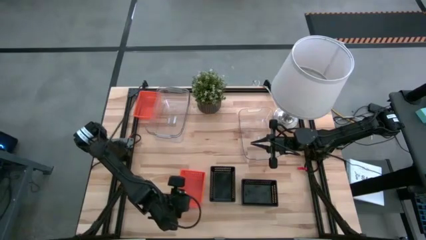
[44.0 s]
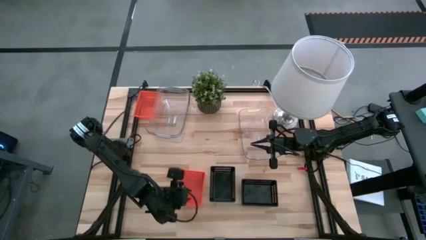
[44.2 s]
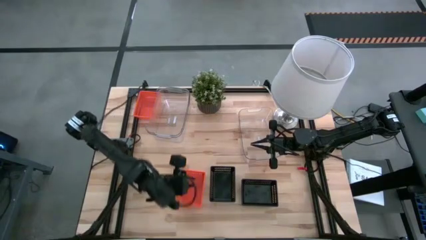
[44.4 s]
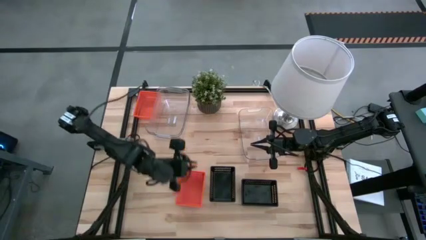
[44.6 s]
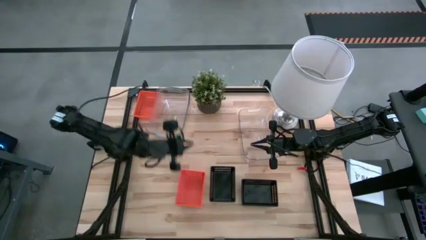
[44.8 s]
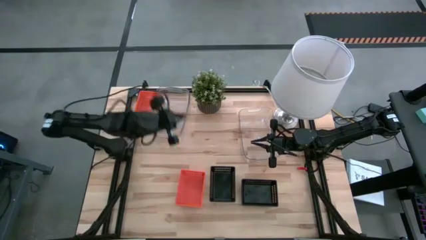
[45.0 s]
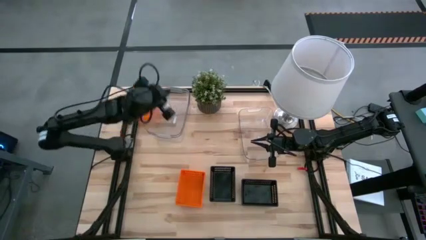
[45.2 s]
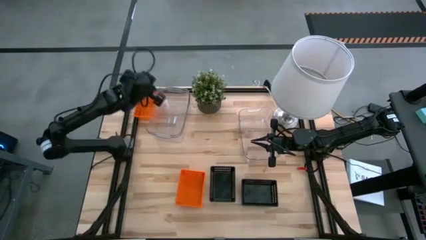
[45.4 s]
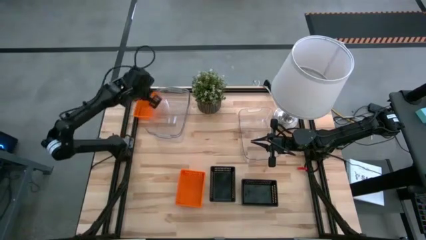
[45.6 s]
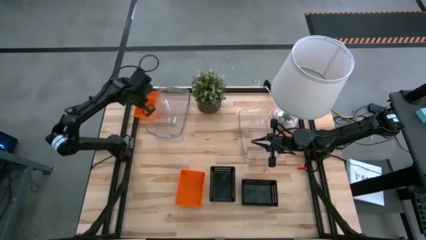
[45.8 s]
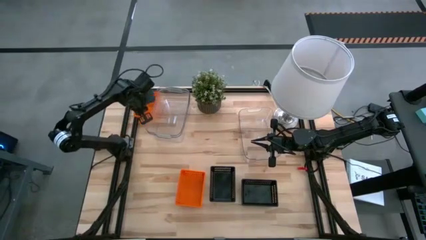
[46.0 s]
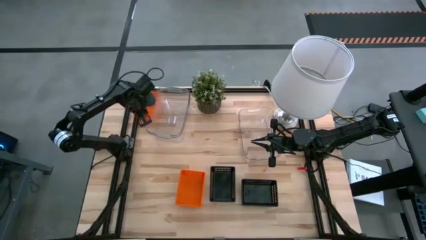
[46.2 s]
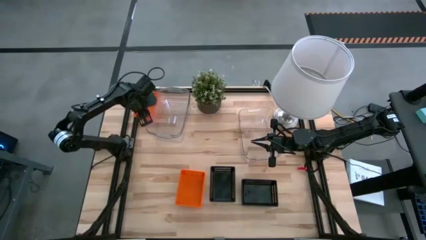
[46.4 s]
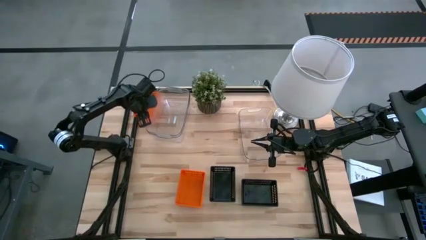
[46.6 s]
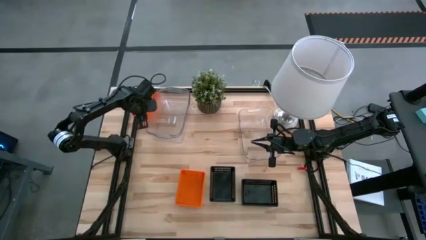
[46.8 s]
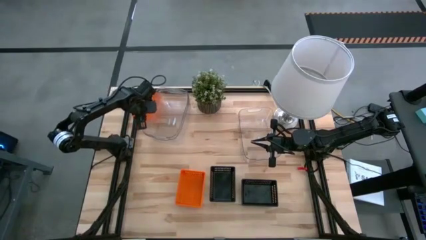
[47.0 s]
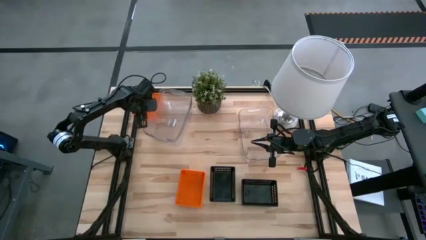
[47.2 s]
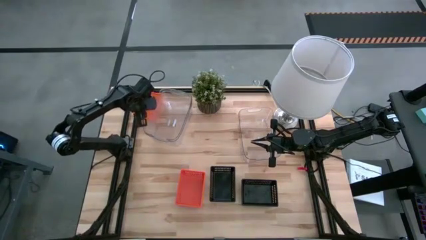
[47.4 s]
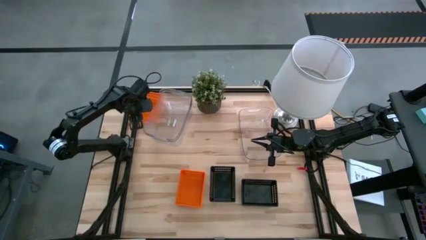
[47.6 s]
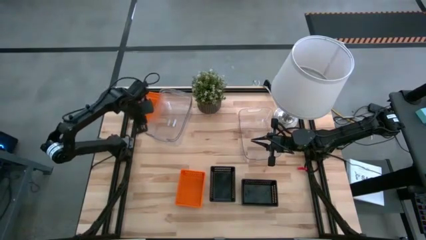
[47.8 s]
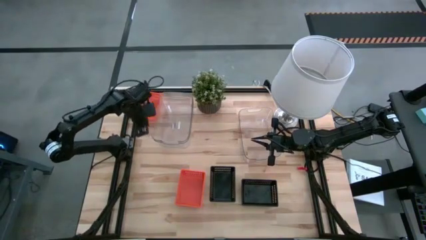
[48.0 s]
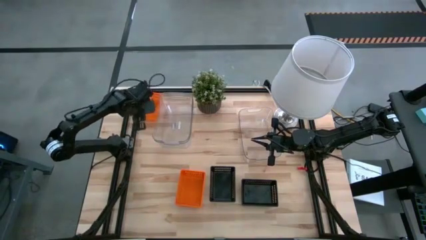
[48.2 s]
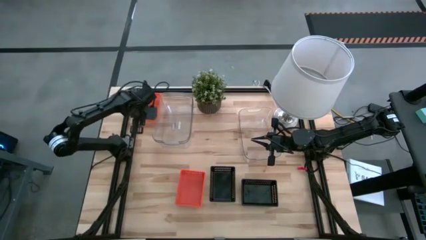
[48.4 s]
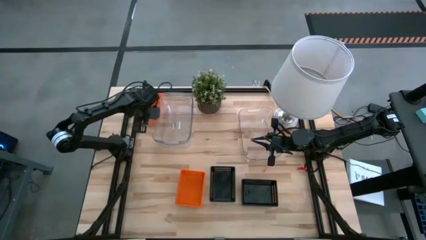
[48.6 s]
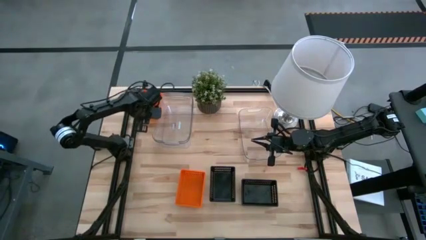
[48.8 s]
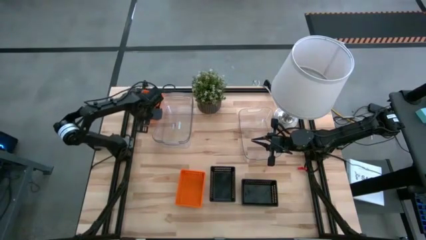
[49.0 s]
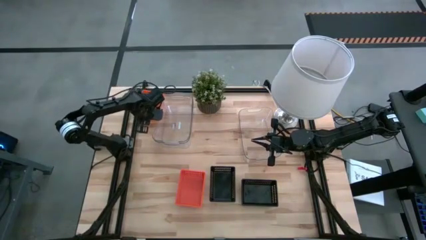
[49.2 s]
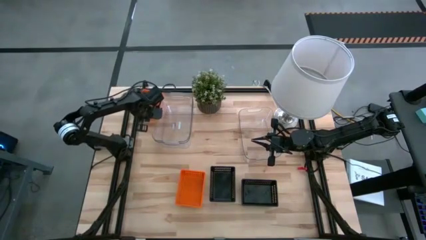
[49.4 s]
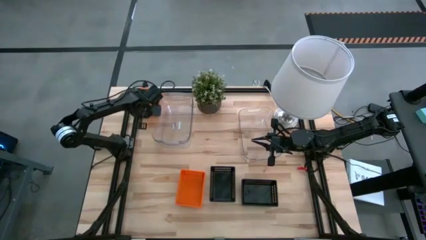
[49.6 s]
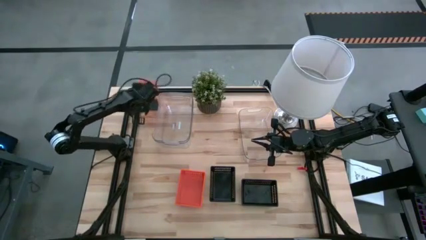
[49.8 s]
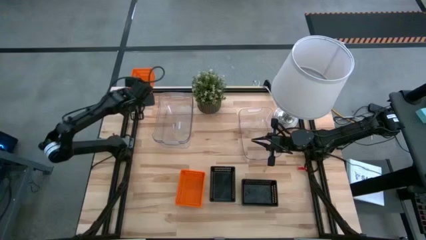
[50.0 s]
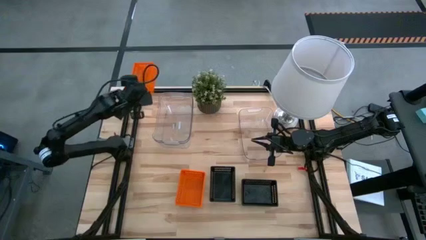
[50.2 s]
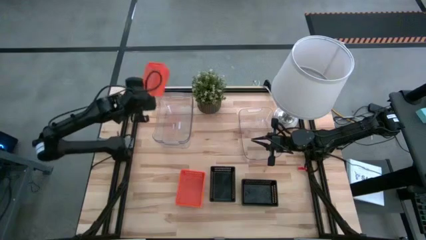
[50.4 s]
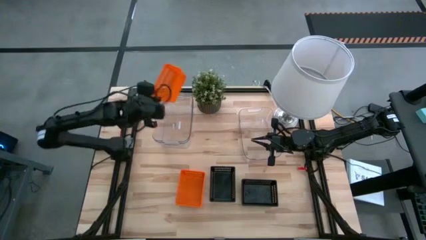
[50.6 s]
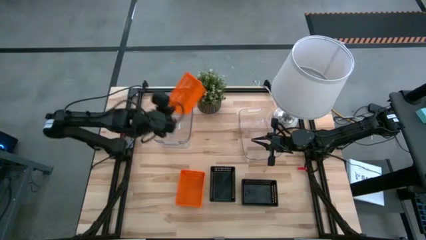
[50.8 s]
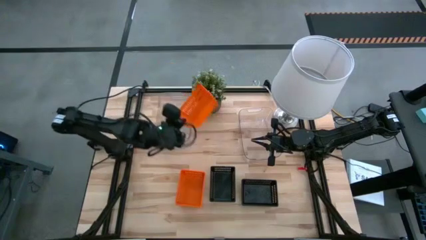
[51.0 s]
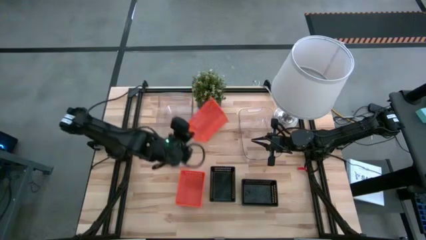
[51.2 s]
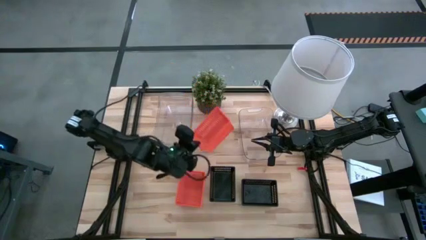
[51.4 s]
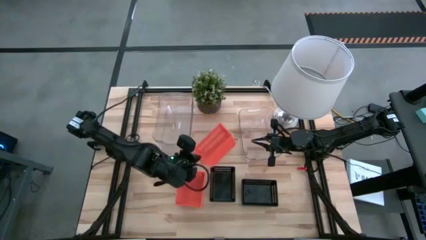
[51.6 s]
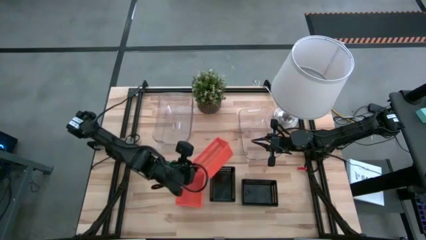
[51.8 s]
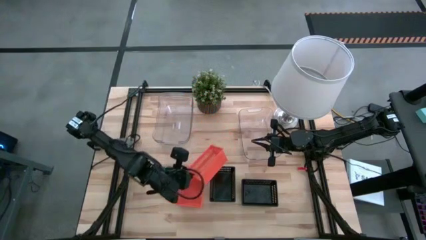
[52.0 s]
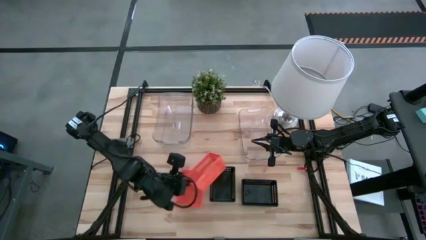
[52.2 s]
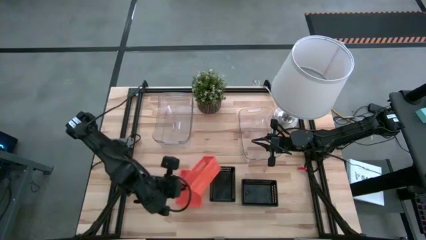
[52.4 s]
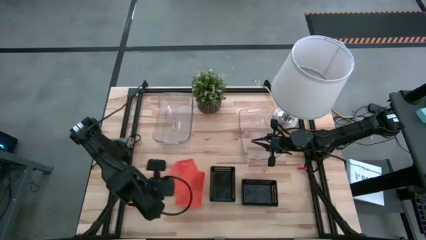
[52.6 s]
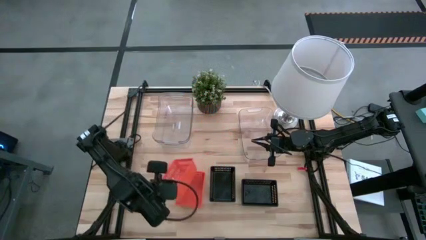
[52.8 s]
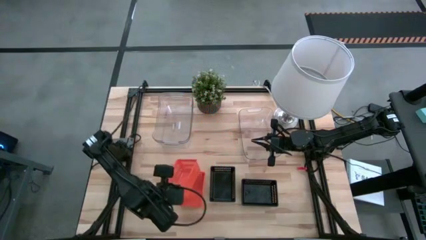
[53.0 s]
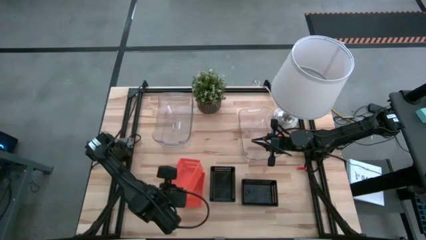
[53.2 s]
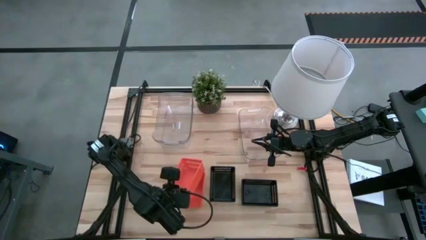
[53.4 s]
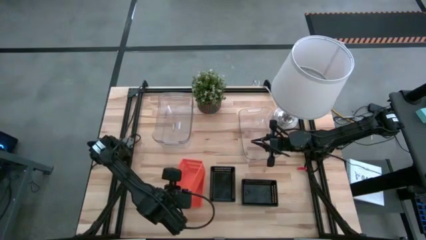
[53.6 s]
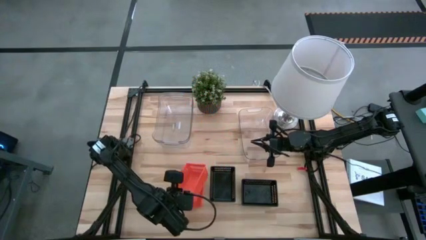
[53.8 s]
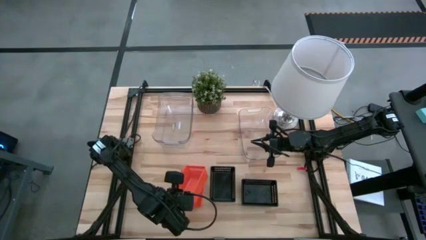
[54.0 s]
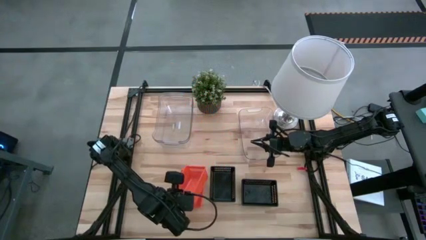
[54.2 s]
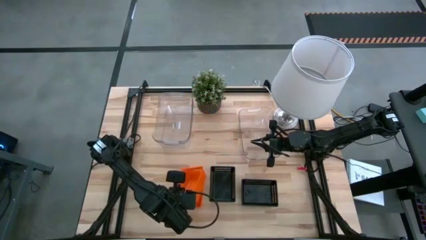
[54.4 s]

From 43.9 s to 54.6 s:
Stack the top orange bin on the bottom orange bins

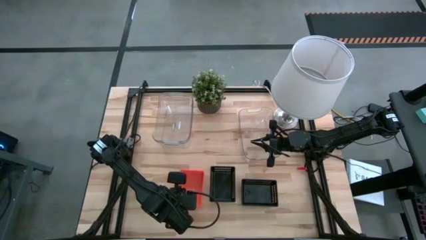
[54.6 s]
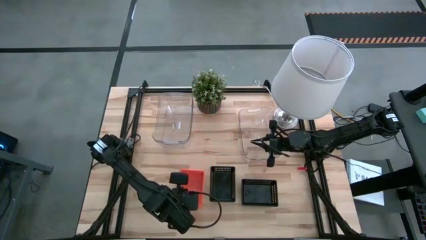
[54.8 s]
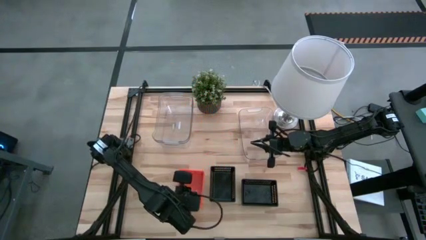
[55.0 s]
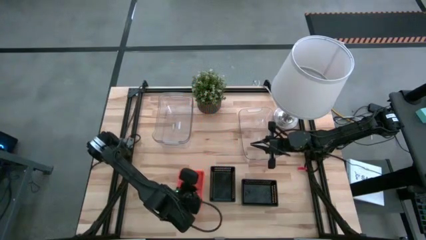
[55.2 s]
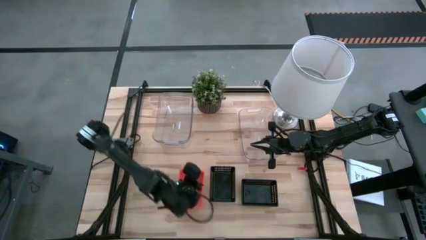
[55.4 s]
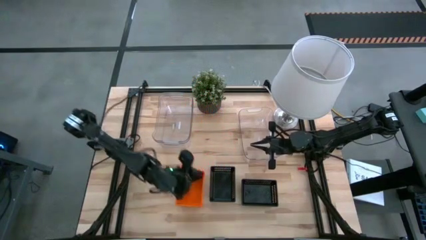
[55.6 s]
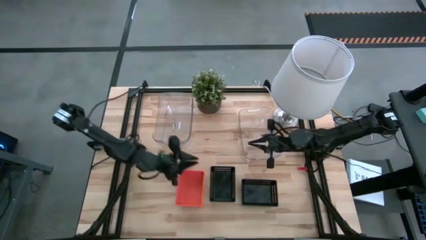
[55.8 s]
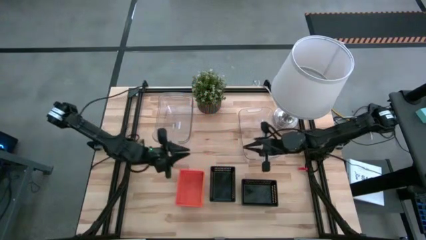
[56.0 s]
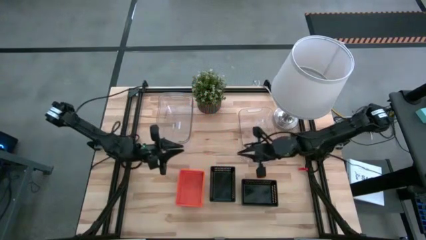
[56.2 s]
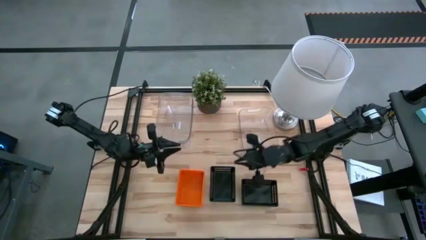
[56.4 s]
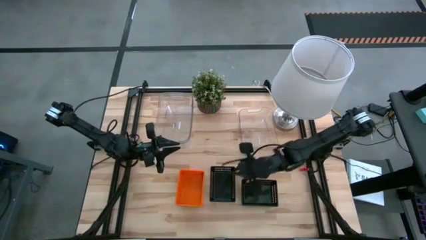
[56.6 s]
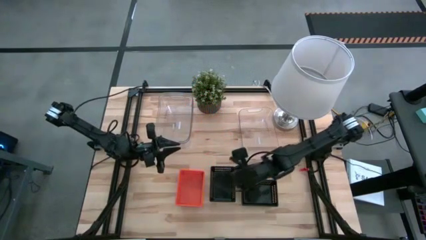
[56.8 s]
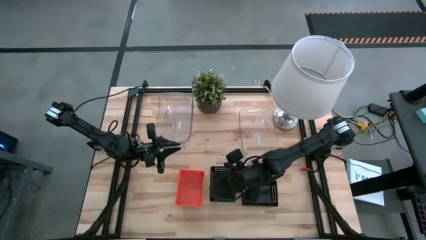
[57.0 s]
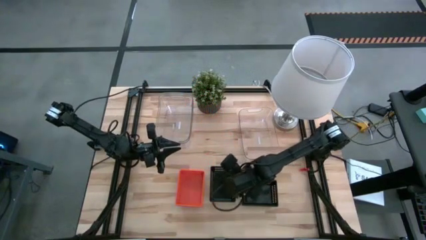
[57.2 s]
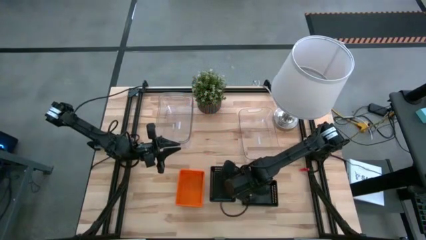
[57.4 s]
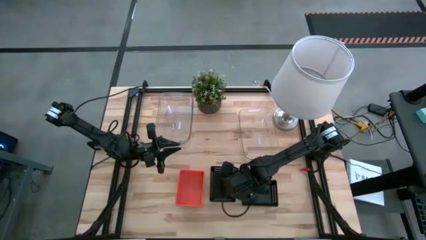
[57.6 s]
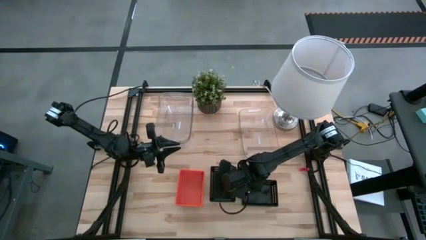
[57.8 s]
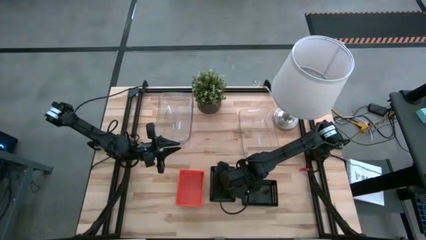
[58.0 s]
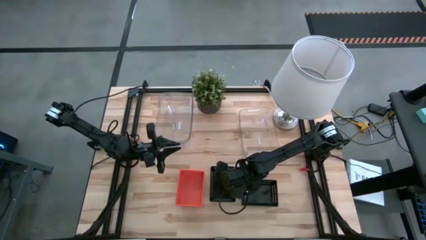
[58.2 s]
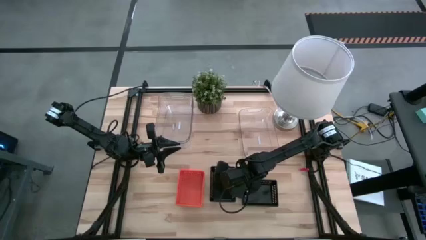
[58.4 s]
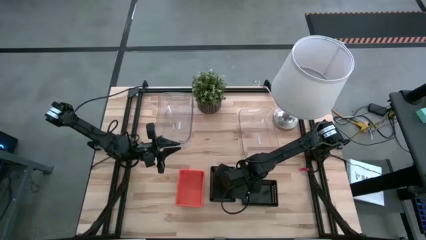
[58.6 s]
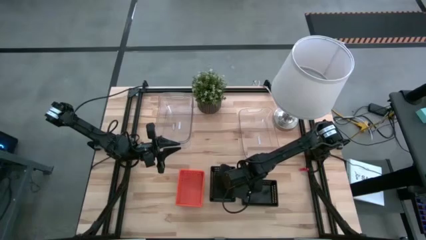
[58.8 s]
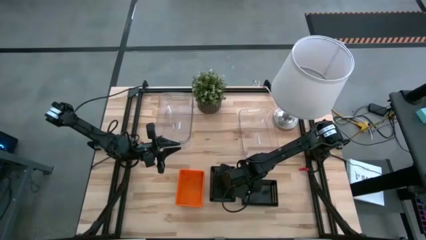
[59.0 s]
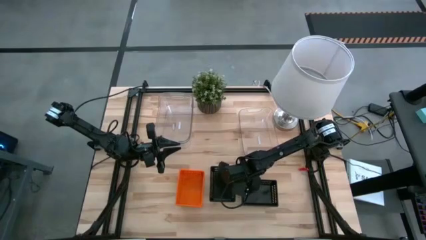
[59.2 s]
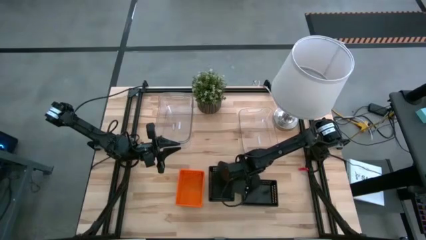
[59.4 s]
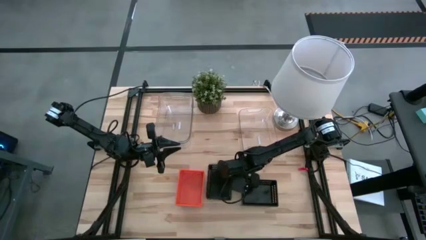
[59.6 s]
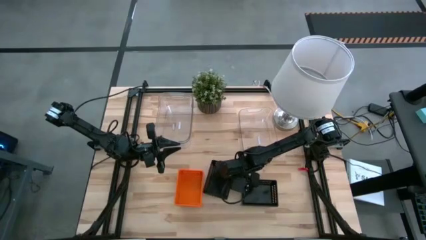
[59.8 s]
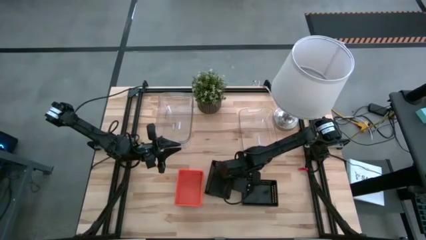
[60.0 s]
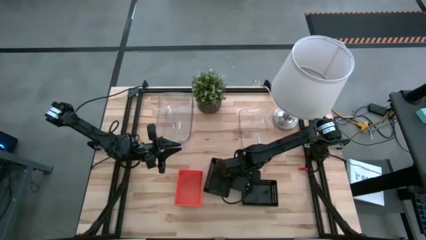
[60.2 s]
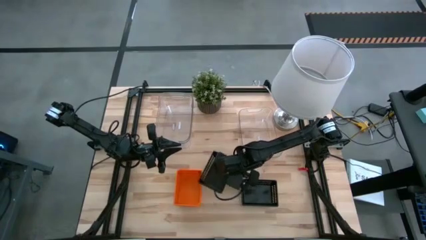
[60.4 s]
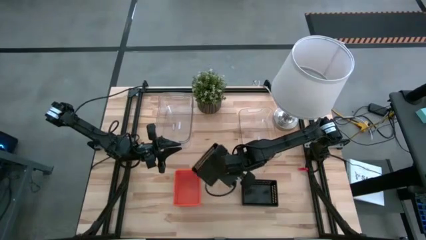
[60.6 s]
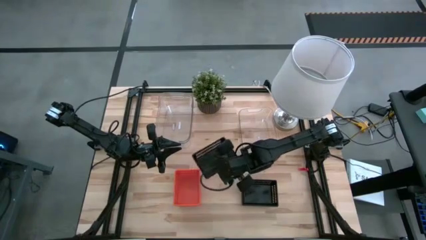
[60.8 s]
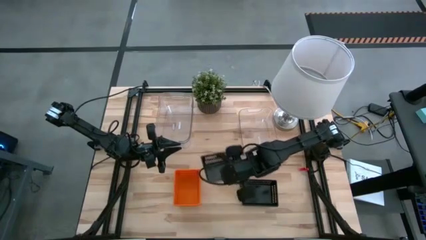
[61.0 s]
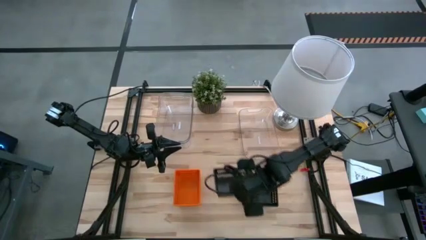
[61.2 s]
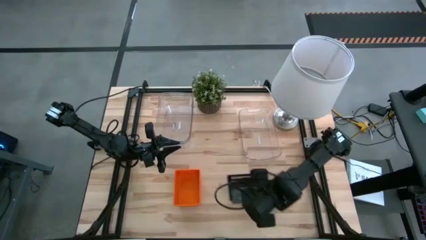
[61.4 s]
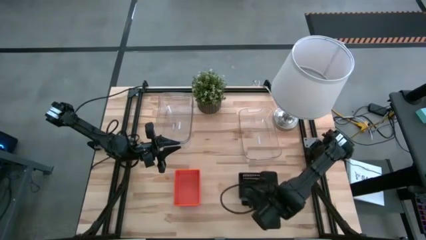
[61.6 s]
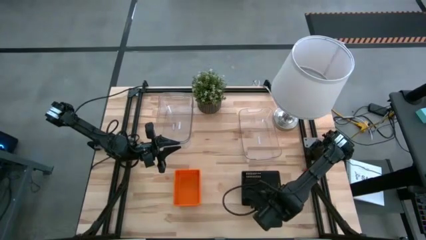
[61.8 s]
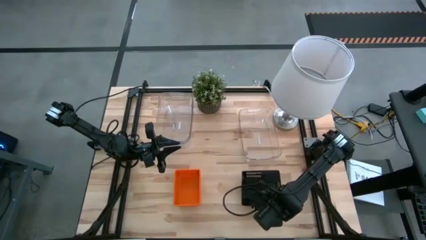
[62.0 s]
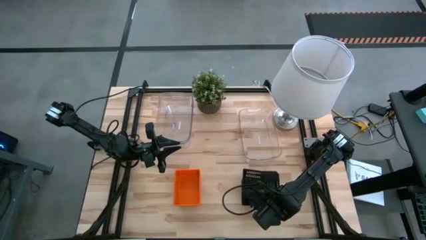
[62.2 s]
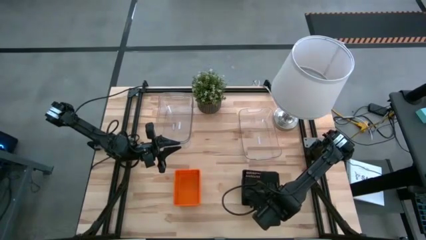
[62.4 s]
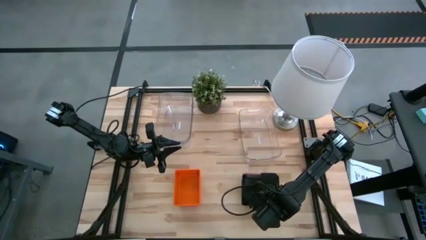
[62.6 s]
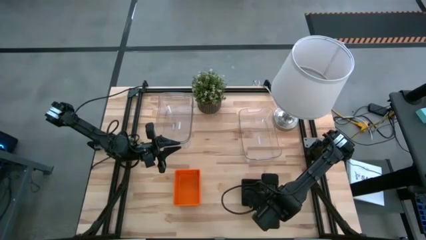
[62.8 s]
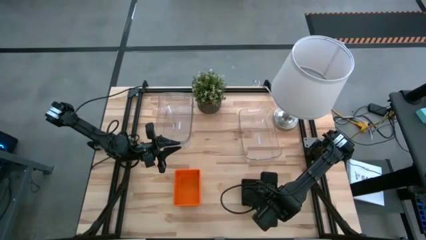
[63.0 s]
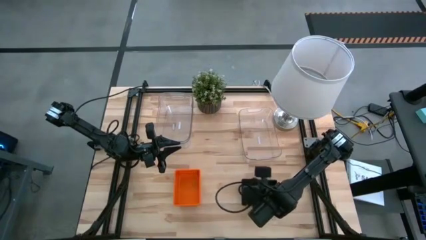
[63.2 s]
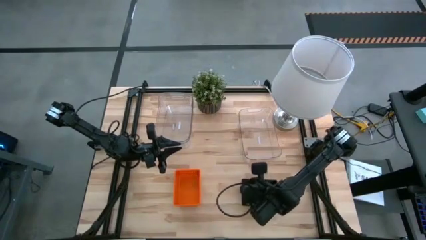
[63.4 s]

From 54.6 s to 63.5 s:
Stack the left black bin on the right black bins
